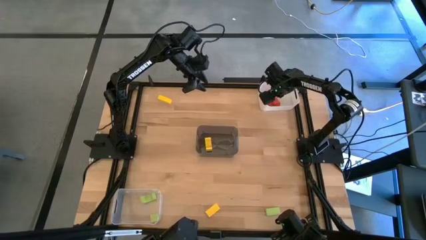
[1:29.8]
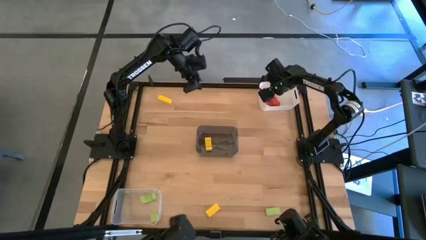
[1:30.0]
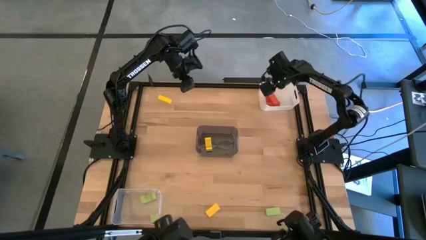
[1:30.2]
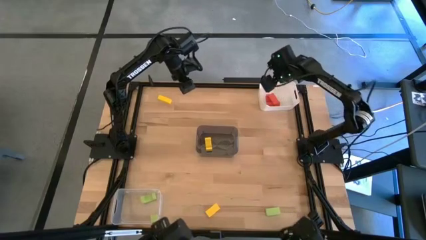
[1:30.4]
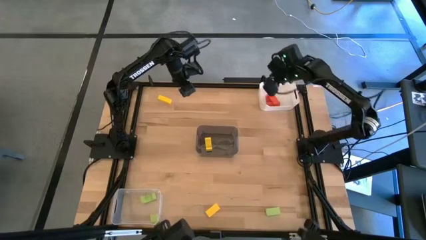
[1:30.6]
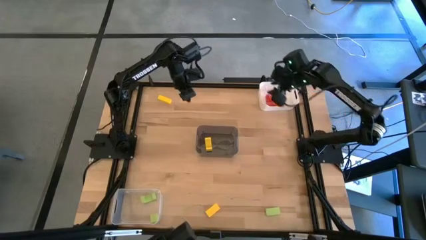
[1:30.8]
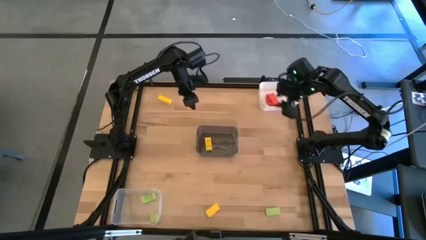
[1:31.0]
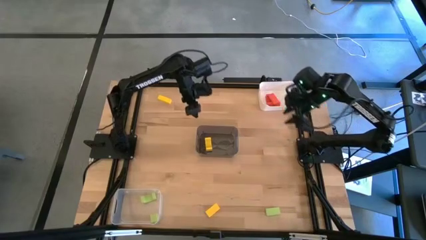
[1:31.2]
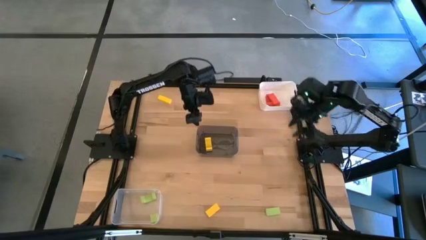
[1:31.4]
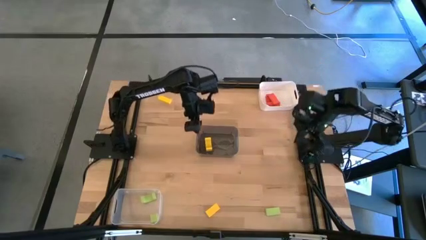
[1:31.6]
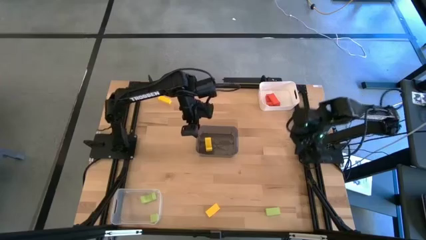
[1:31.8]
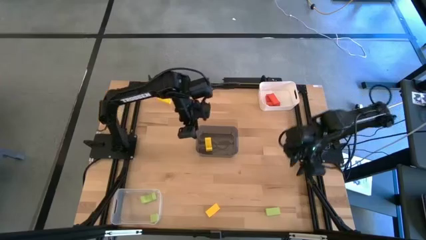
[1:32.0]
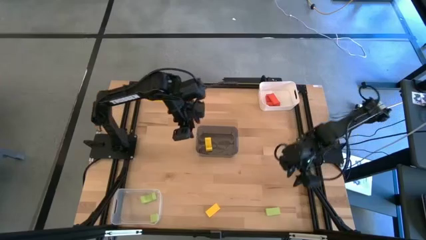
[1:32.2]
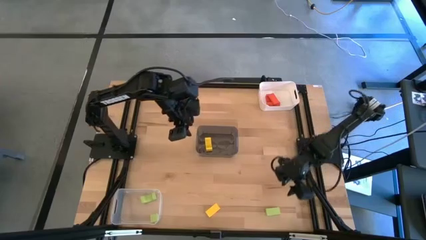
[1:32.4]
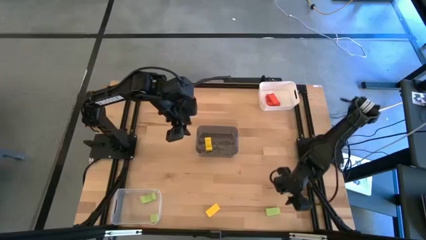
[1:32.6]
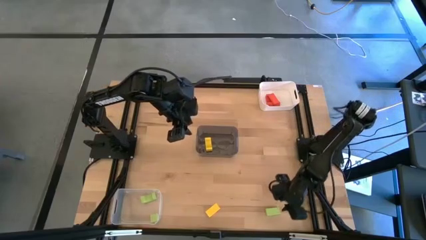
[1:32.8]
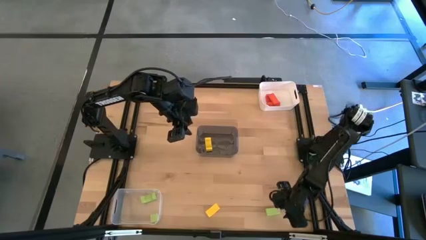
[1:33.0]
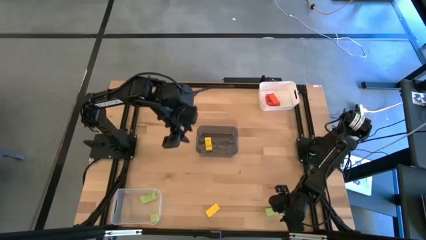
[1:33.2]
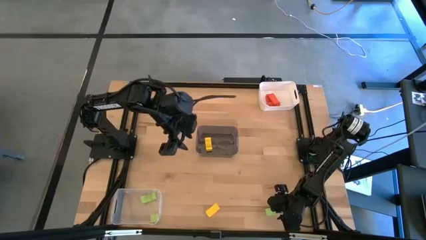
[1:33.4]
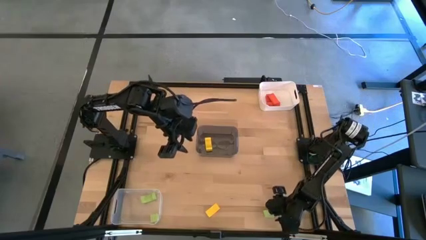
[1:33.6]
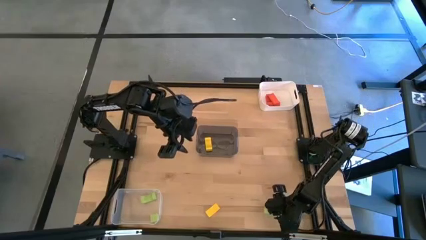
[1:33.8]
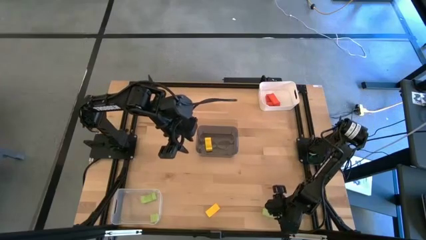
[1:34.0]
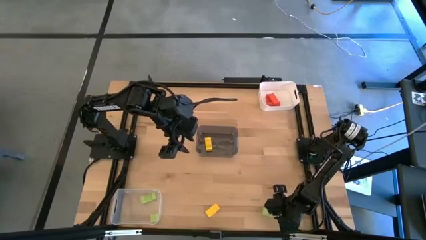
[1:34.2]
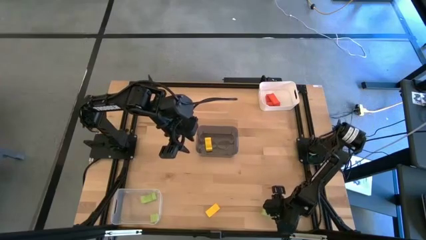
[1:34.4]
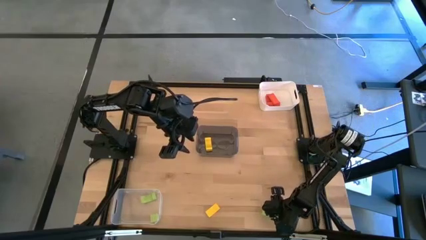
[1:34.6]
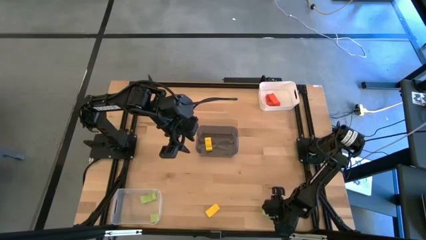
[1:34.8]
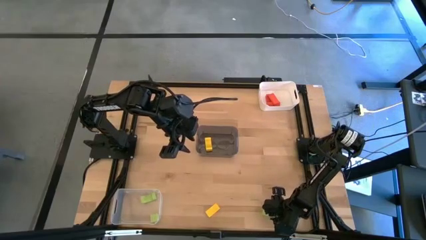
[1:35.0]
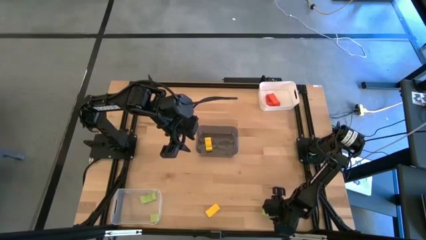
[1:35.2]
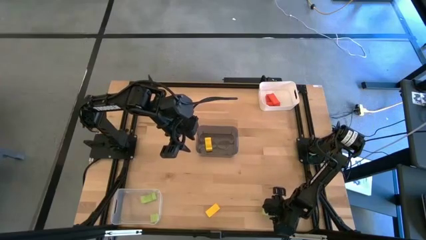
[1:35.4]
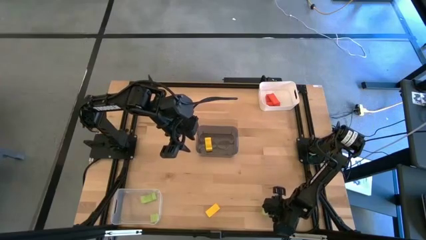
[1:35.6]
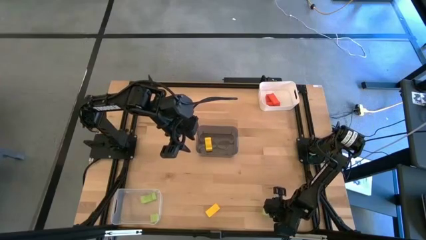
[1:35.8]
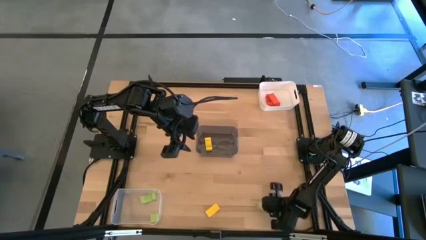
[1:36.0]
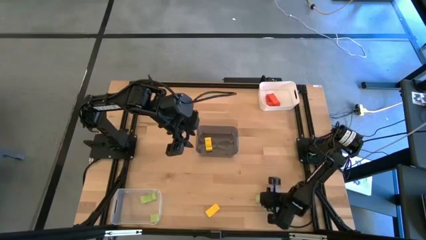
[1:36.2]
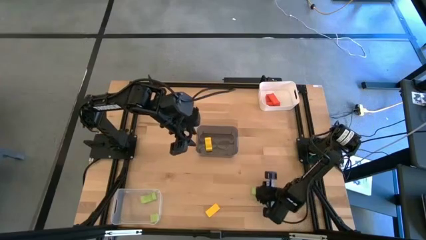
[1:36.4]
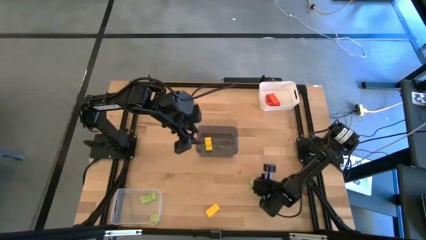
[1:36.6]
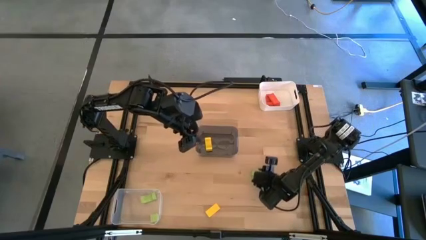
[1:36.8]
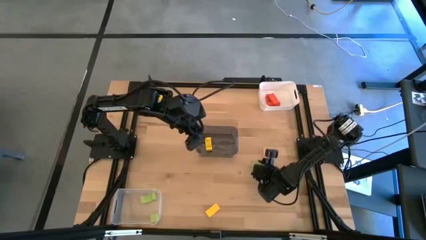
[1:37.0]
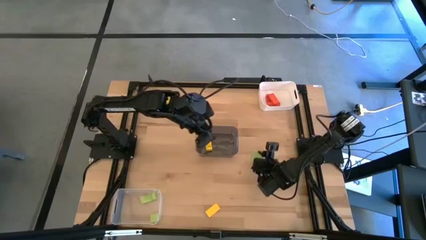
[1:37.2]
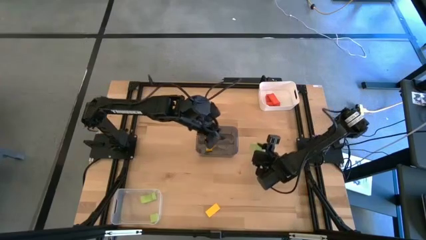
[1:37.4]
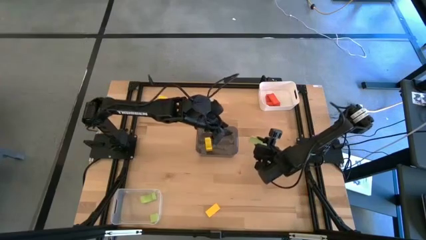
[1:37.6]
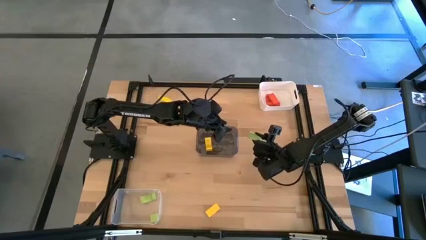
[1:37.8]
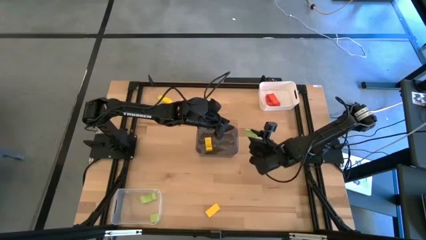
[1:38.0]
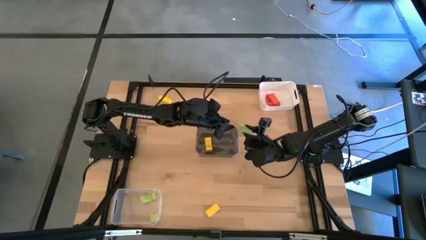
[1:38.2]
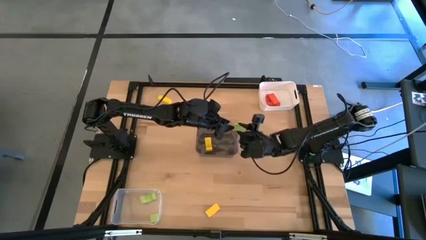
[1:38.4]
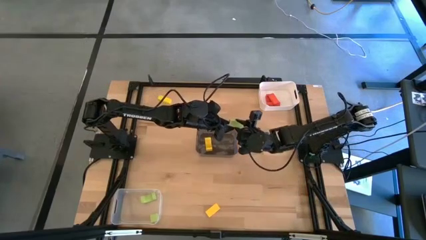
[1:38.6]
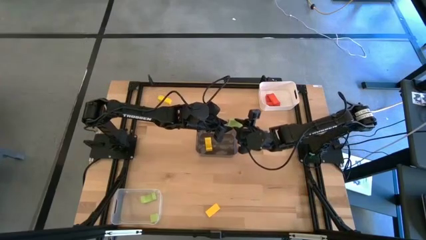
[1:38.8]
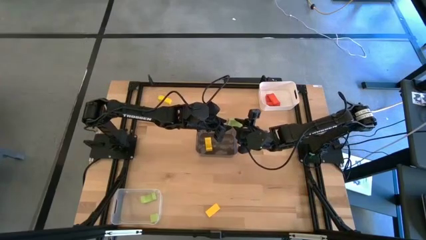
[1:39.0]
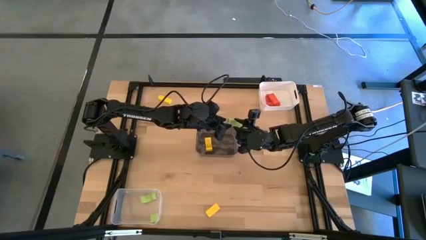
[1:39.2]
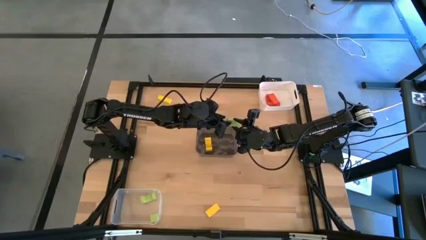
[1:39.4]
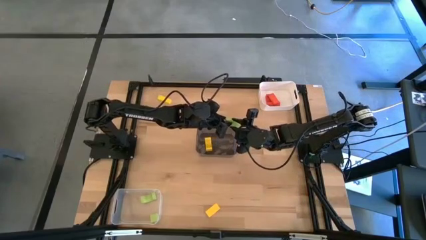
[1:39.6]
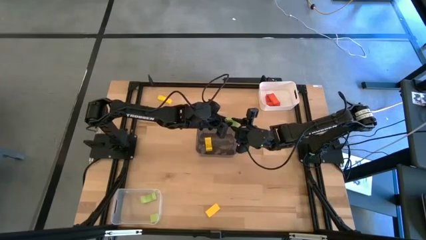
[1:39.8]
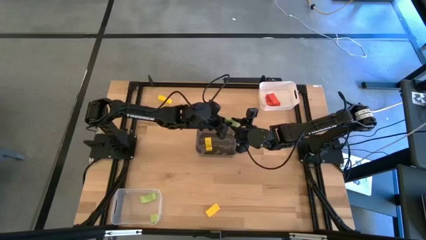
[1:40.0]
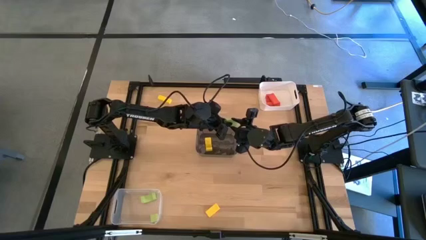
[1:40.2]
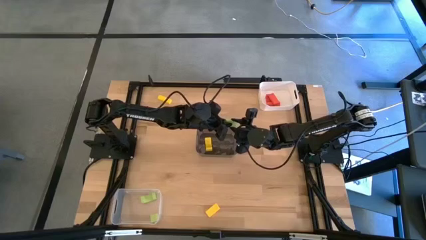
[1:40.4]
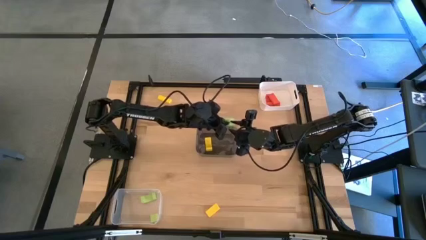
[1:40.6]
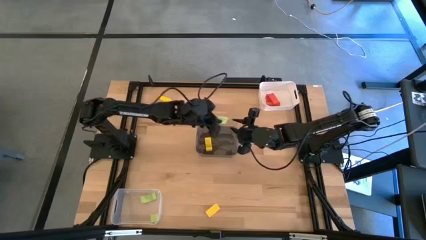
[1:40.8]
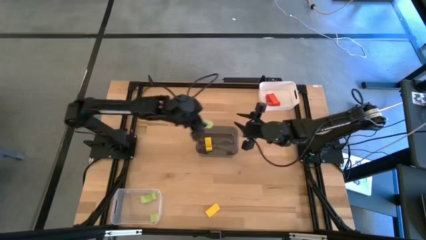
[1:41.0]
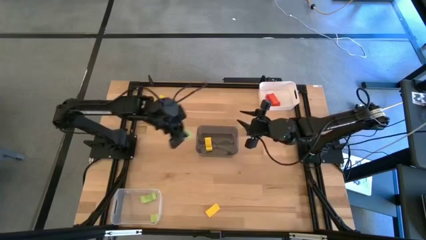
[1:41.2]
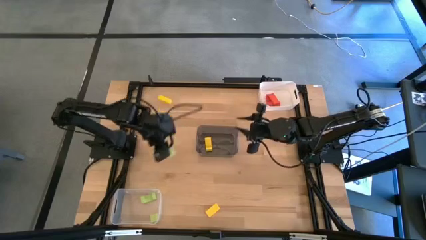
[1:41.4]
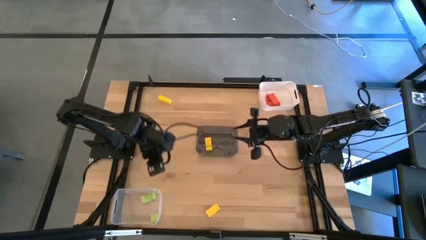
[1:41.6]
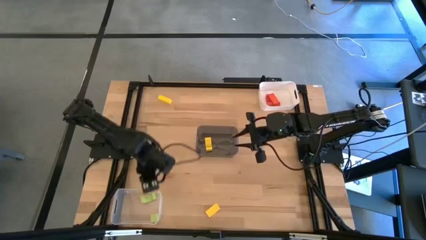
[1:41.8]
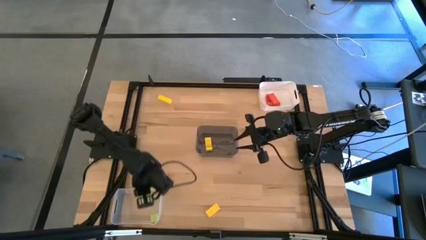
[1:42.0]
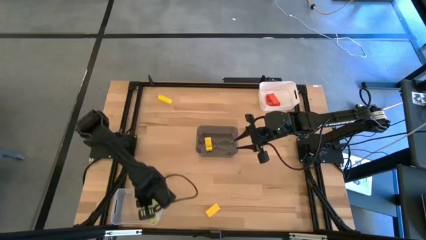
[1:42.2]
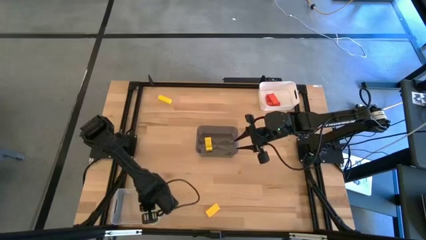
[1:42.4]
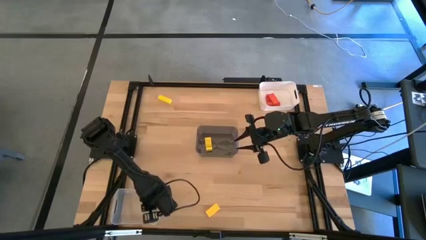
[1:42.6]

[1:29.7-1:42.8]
Task: Sort & place blocks by color
Put the green block into the transparent bin
